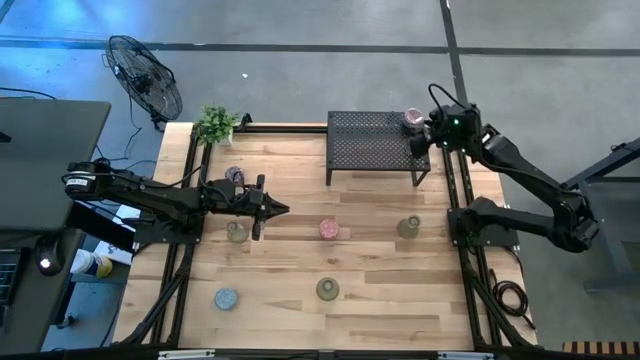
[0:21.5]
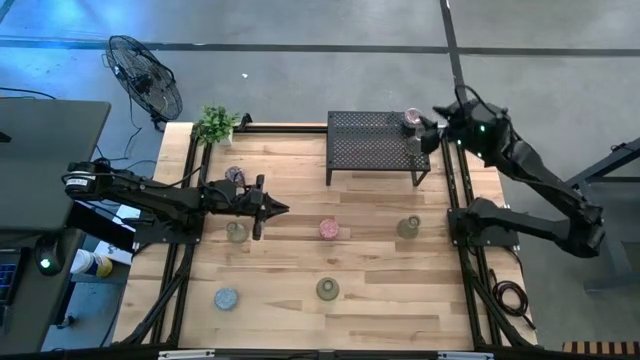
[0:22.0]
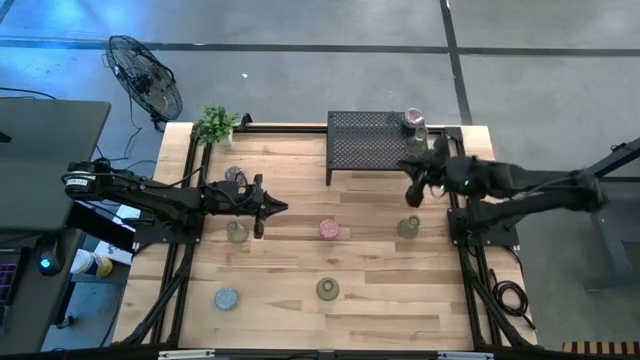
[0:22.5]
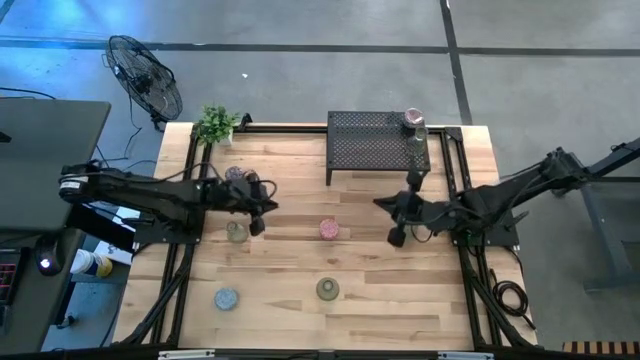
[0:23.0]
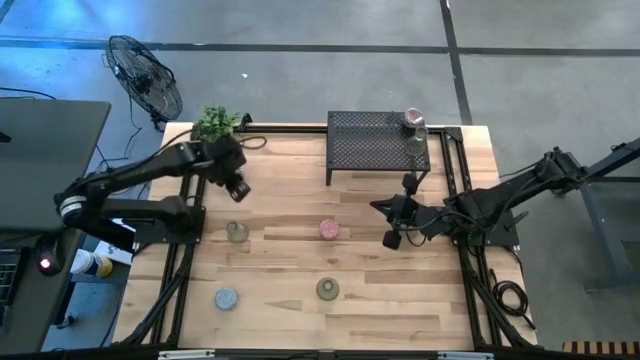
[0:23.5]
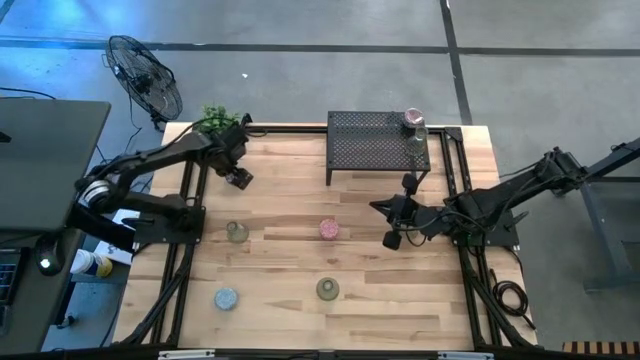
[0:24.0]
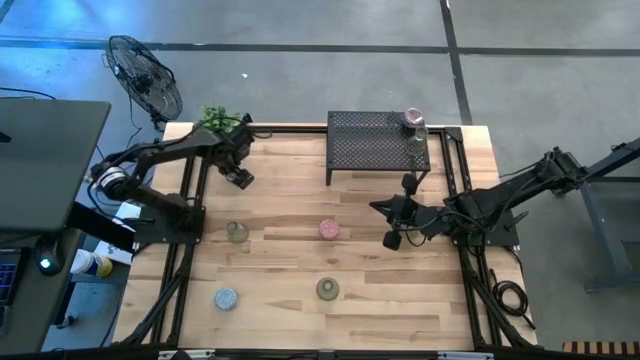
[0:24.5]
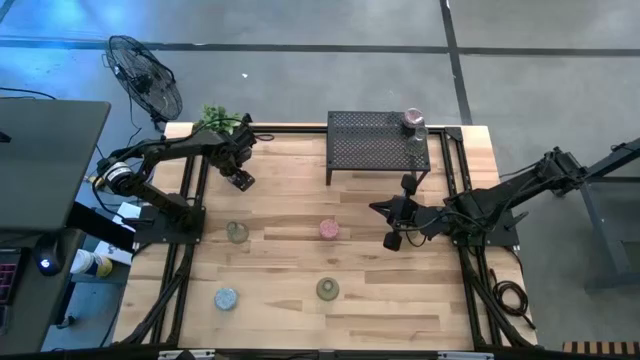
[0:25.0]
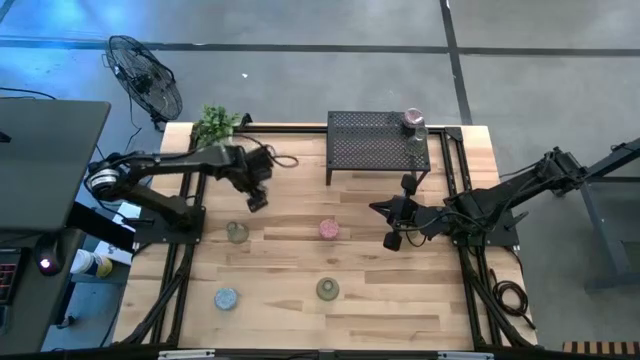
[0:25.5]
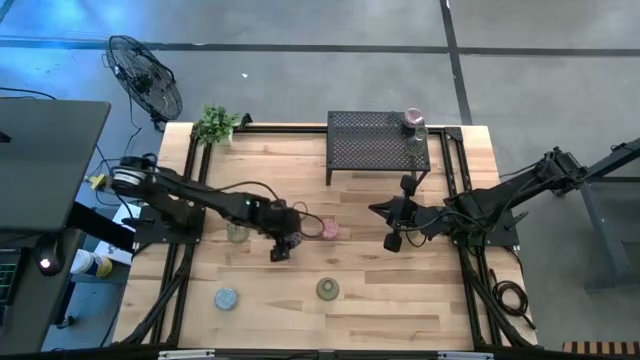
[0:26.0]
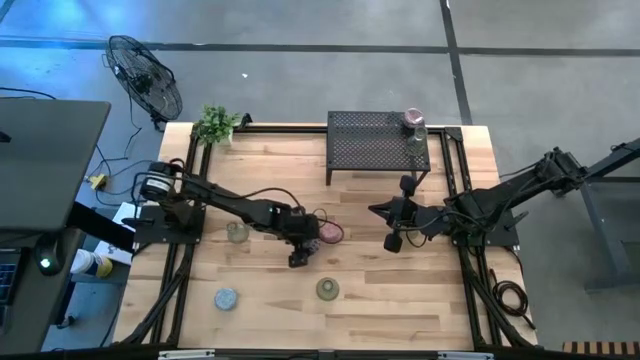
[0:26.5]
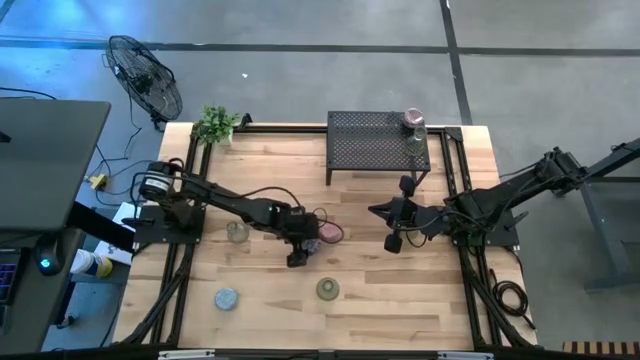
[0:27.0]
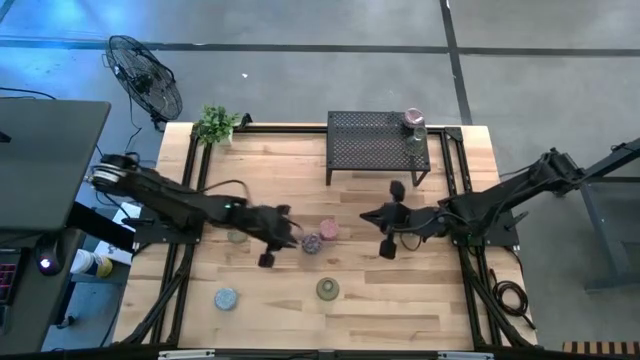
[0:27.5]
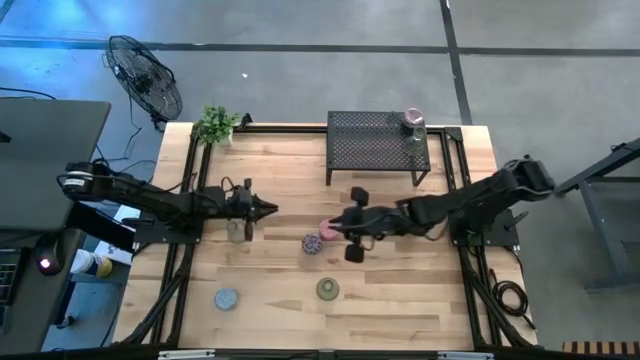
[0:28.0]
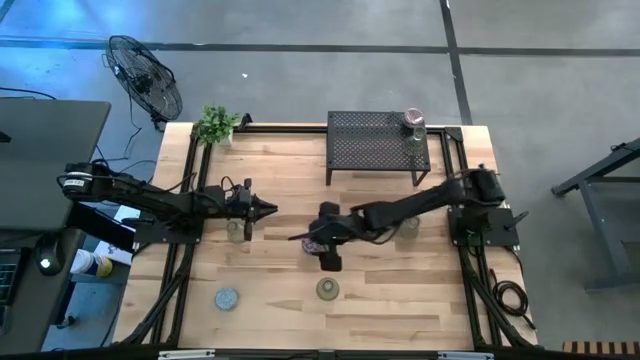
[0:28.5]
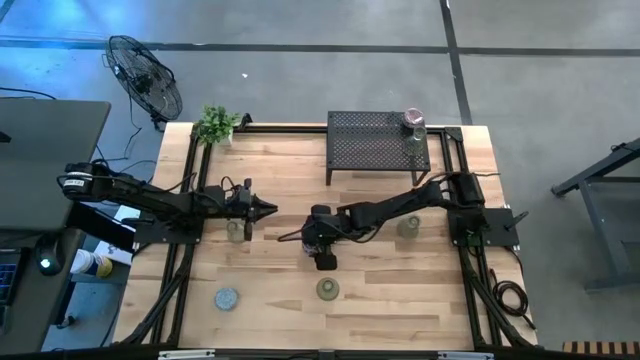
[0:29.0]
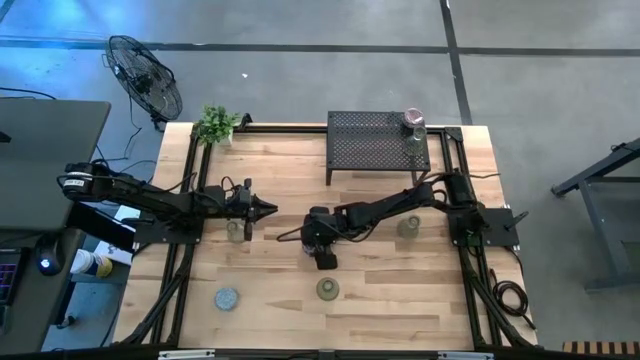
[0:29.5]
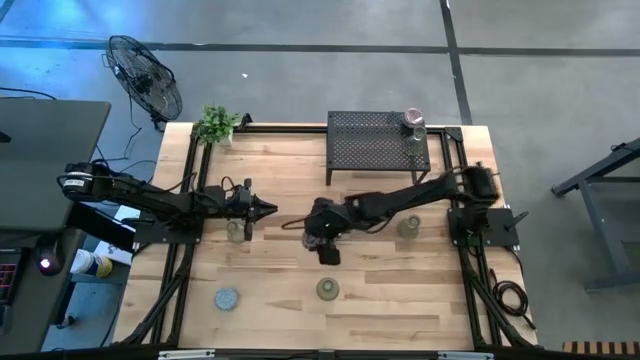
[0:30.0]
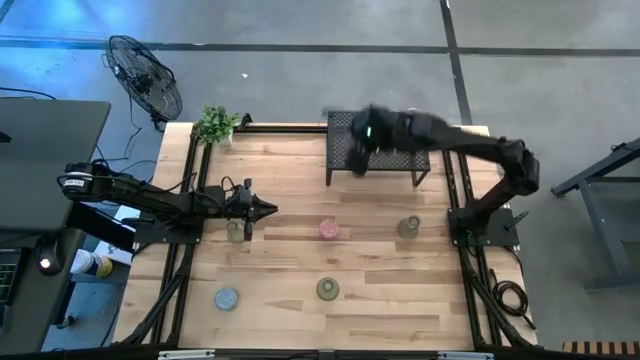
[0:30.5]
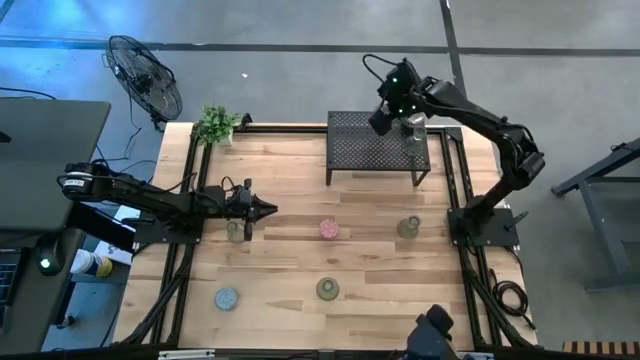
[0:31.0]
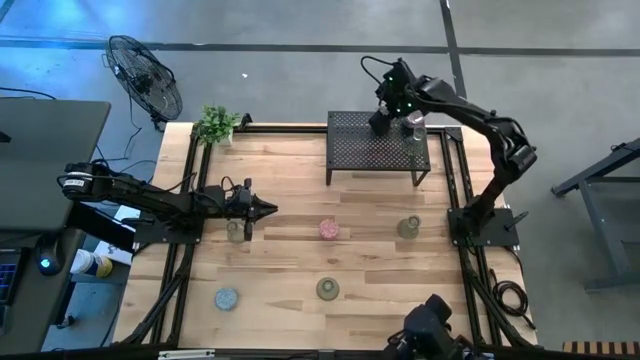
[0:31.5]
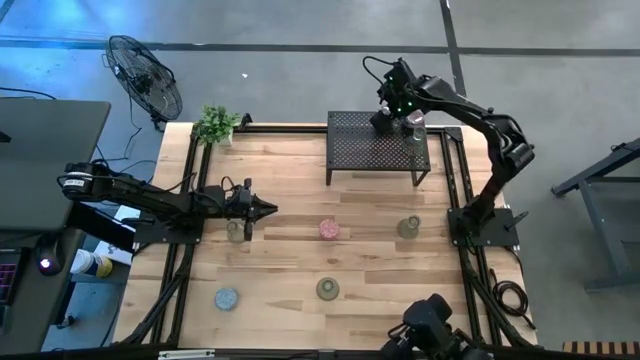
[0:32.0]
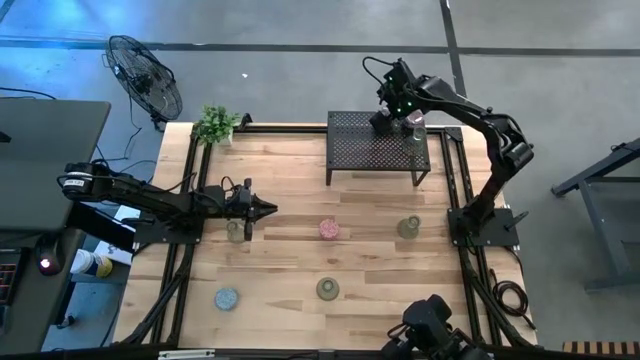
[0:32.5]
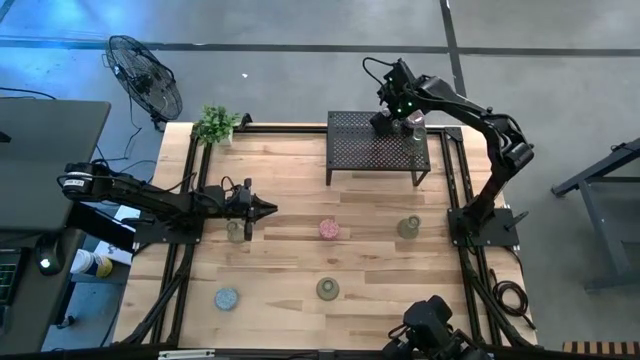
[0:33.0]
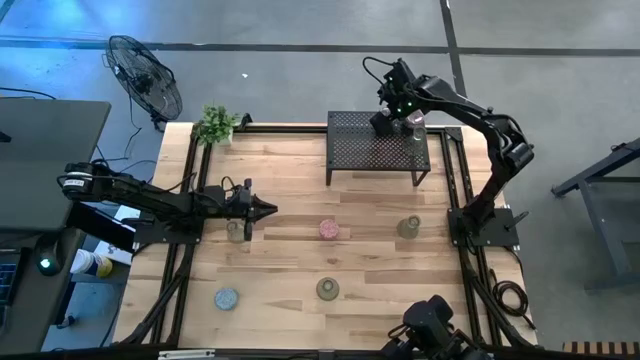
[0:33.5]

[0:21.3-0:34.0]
Task: Pick & Place candle stick holders
Put the black scented candle on the shelf

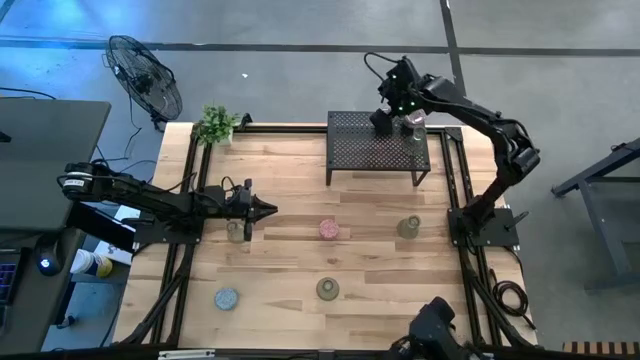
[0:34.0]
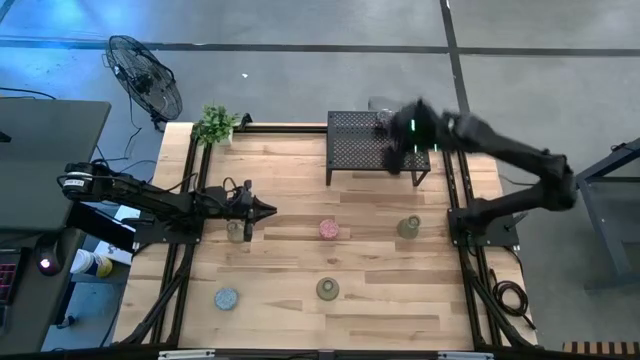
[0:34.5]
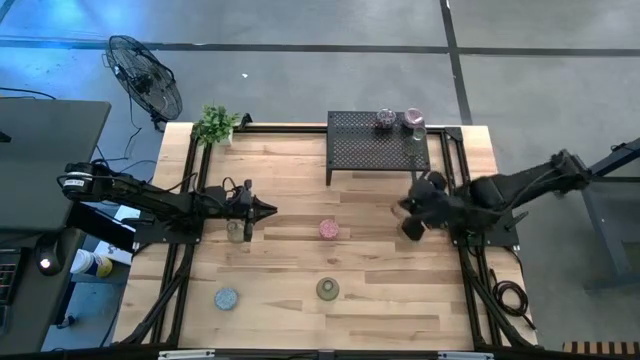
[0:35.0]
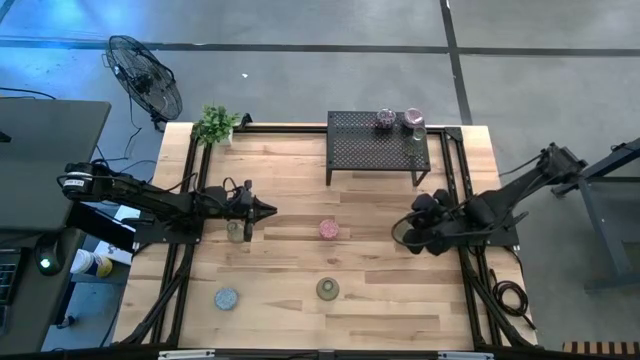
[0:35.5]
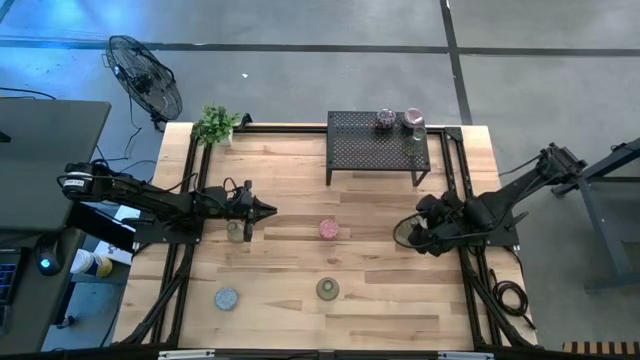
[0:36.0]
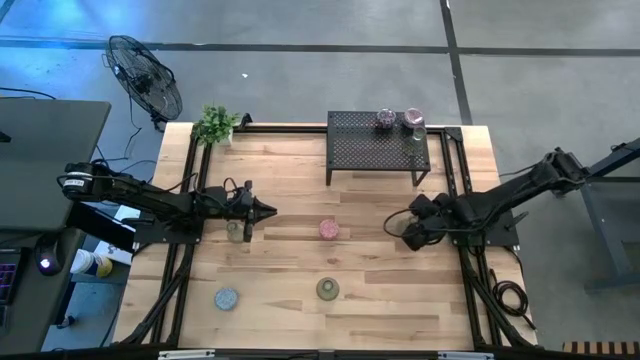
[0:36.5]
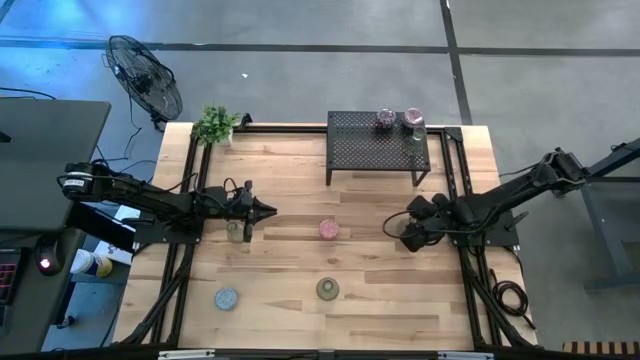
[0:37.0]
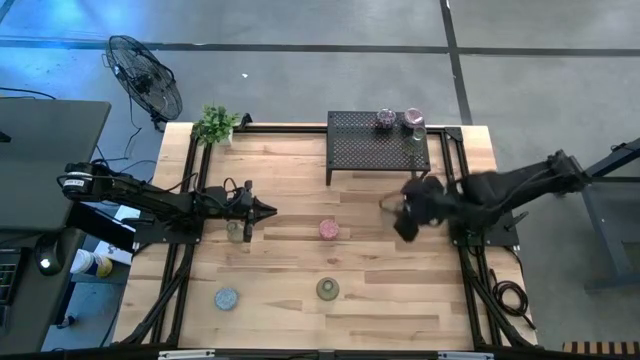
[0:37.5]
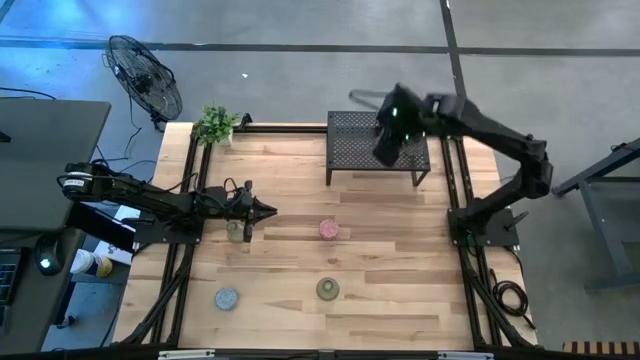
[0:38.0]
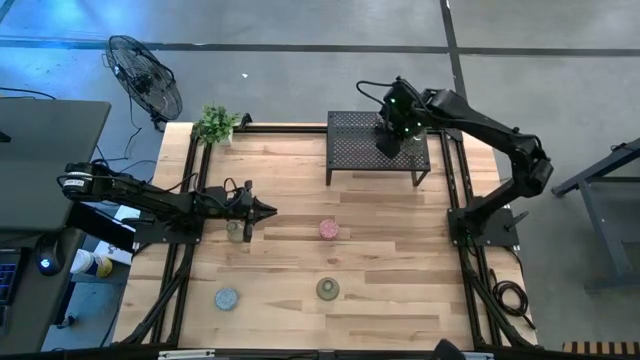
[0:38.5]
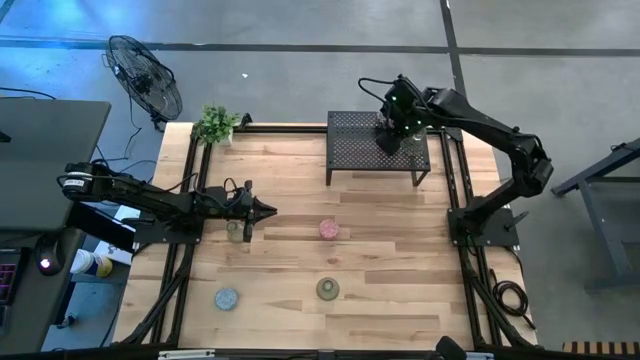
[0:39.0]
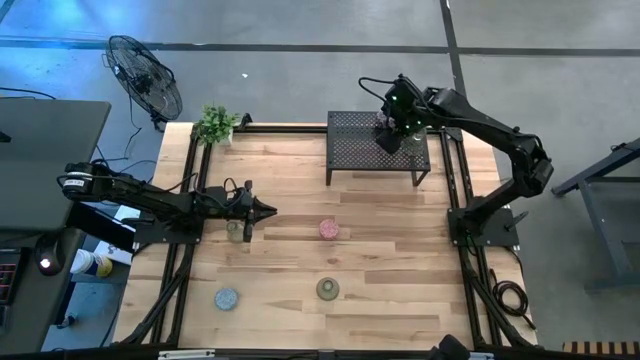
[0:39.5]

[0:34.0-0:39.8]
Put the green glass candle holder on the shelf

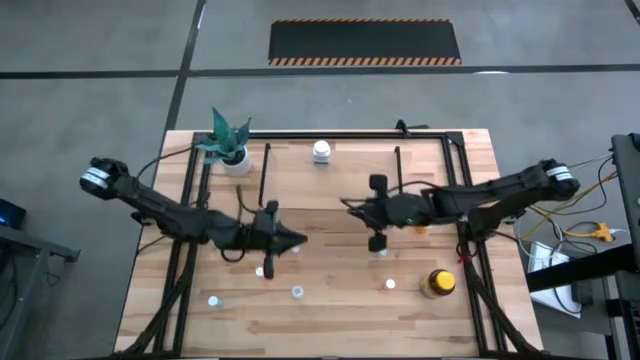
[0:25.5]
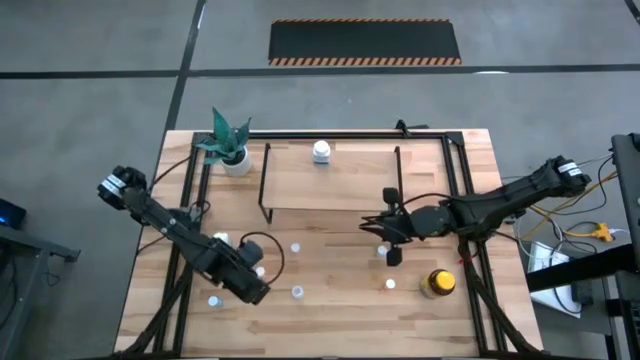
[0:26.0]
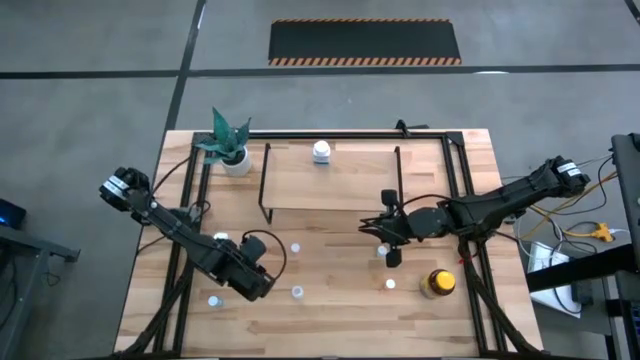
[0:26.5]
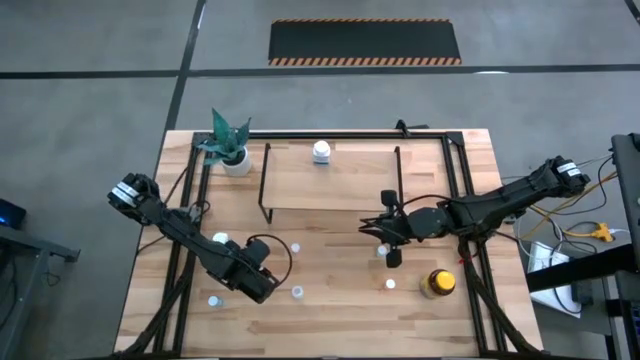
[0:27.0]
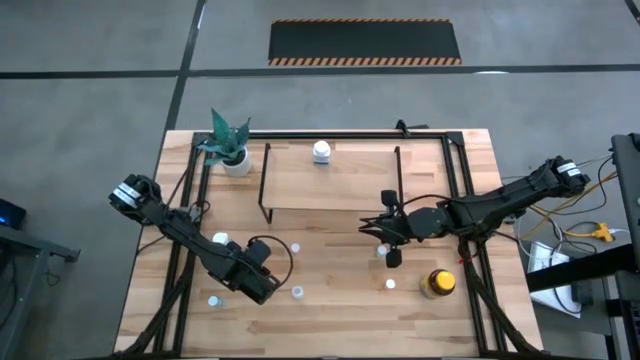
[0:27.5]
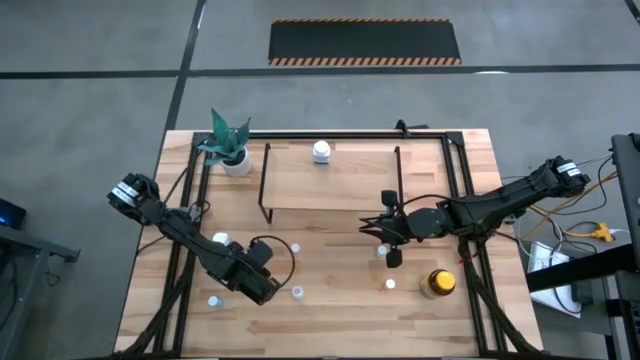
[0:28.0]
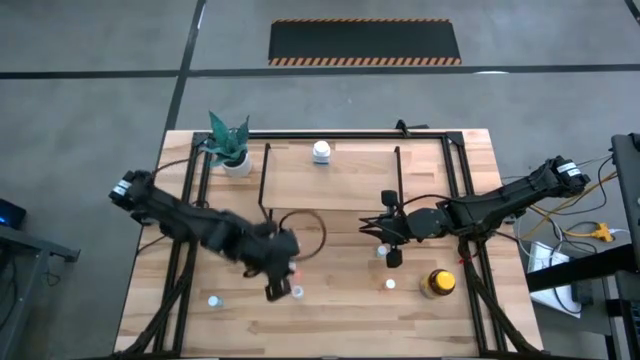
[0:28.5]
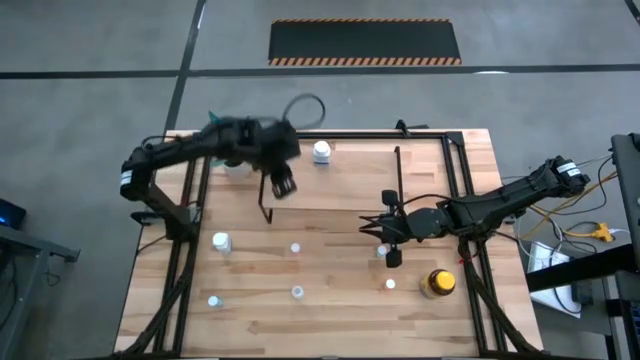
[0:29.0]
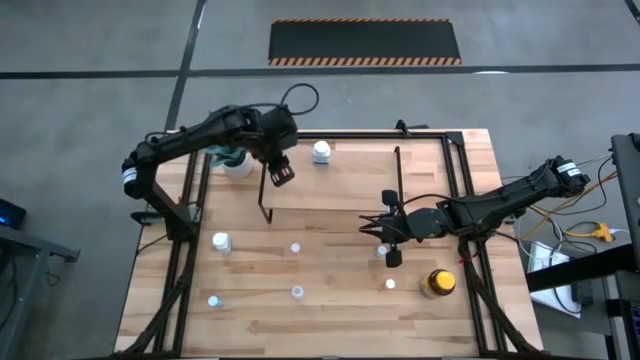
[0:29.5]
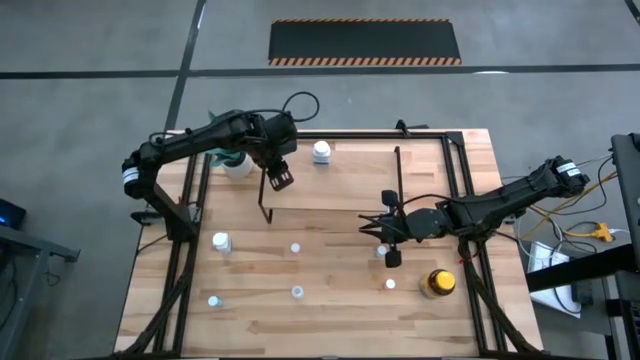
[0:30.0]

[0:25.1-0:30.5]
Task: Pick and place medicine bottles onto shelf by color
Put the bottom left pink pill bottle on the shelf
